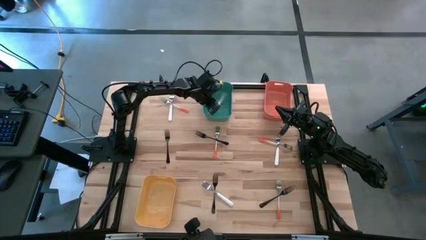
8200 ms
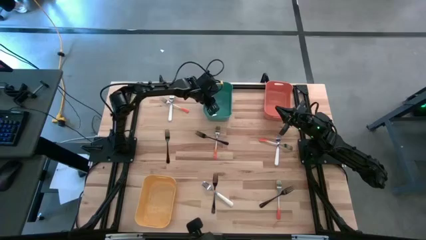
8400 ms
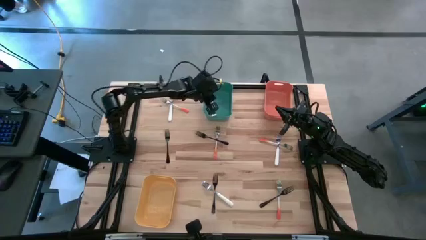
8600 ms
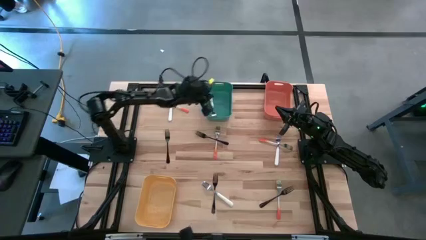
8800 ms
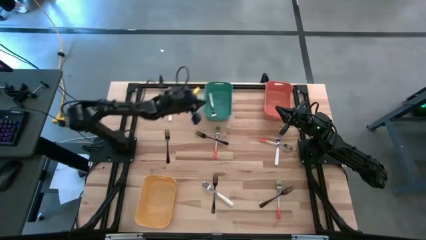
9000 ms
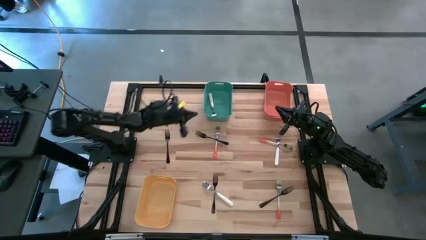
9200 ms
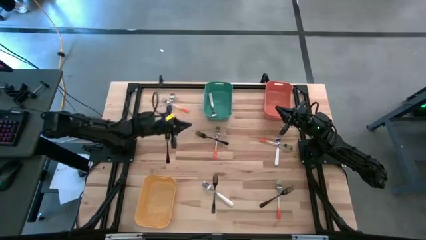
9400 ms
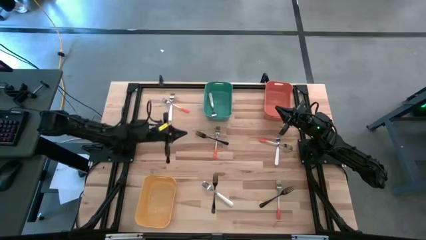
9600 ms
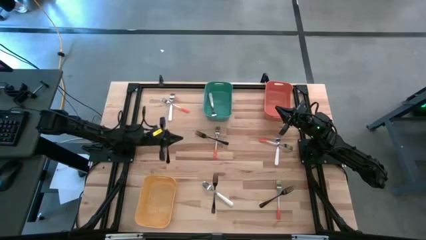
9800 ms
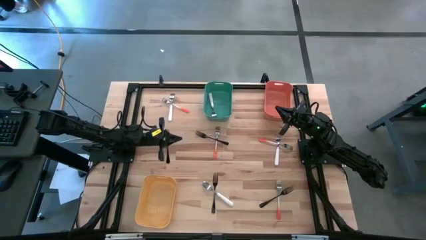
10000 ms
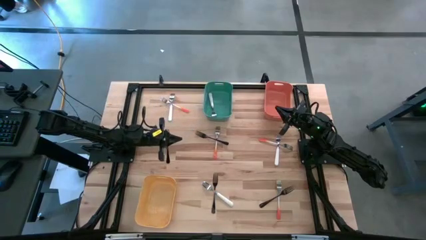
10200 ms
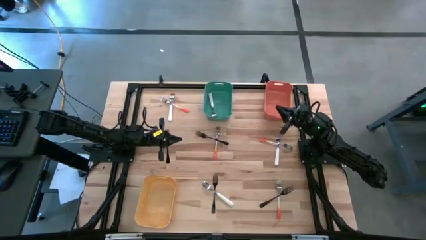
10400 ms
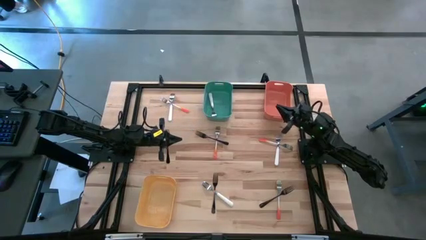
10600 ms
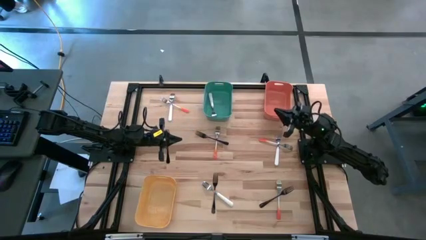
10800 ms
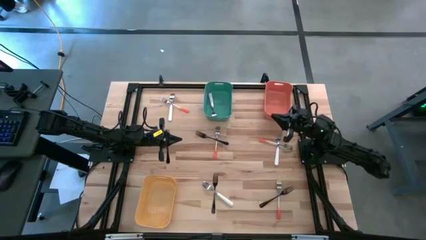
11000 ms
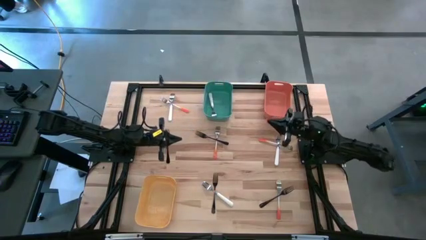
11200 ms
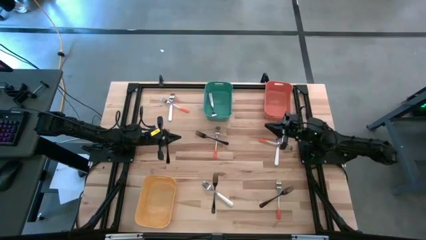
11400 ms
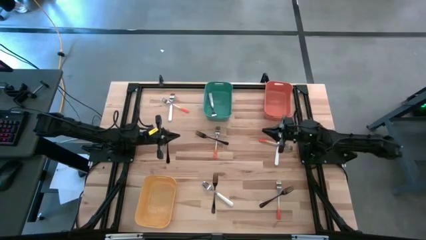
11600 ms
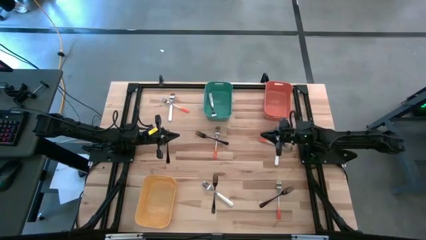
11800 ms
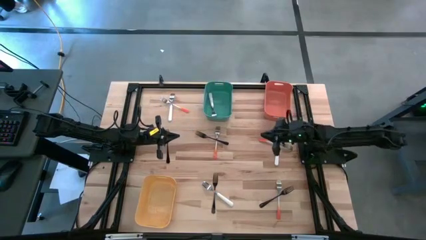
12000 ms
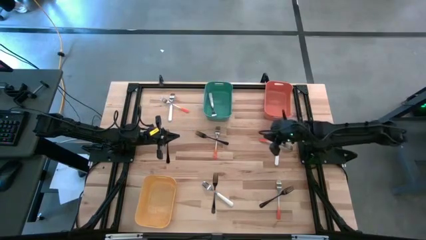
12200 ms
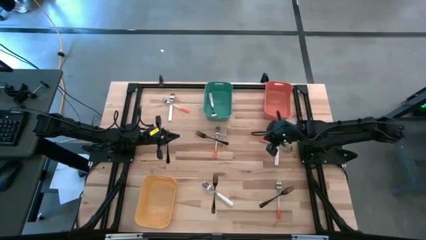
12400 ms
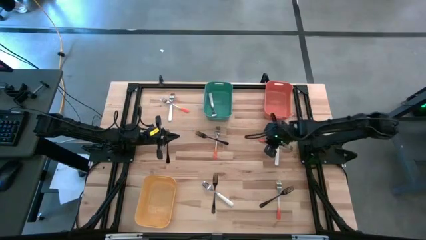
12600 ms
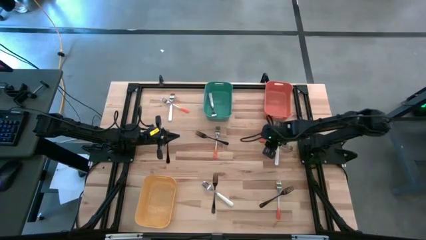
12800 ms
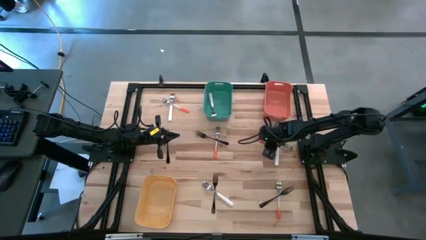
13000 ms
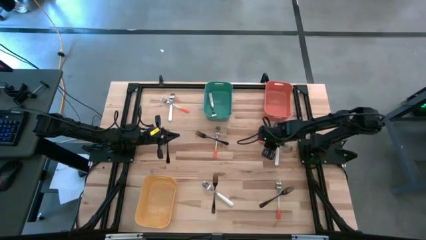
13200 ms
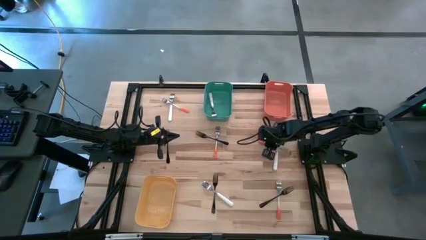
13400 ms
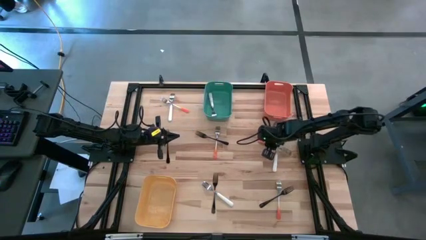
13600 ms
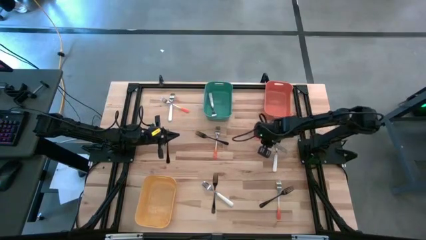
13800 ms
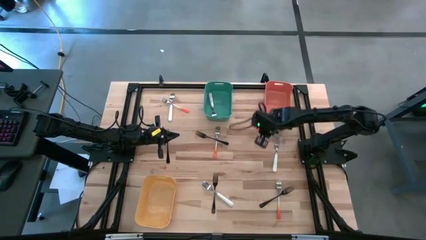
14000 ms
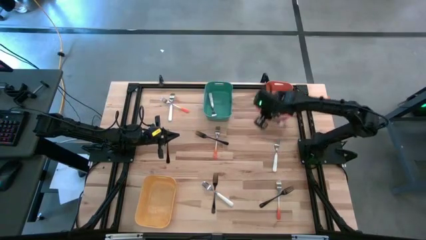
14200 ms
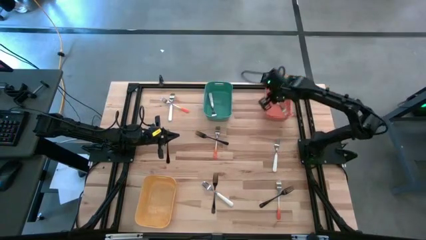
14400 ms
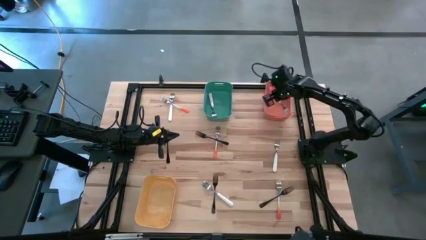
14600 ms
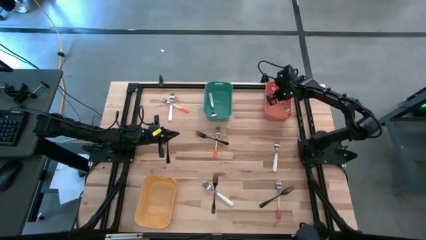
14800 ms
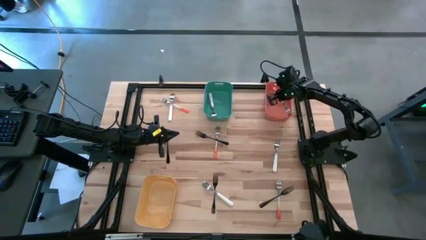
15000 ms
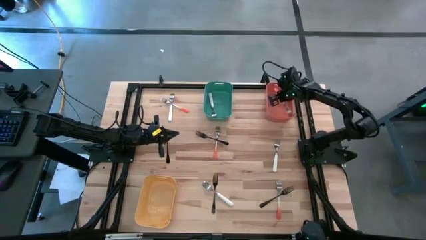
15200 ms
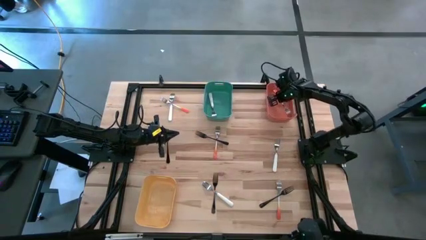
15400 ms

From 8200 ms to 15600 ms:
Task: Sort silverware by color (type)
Put the orange fork into the orange bin

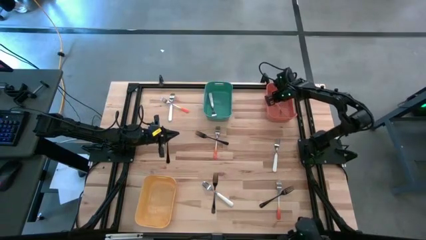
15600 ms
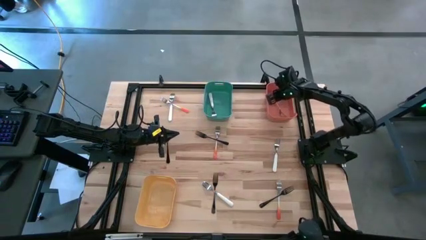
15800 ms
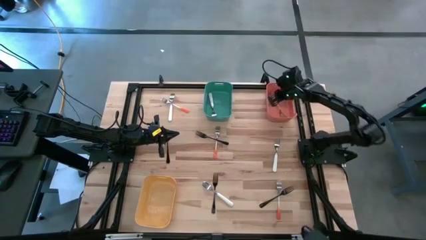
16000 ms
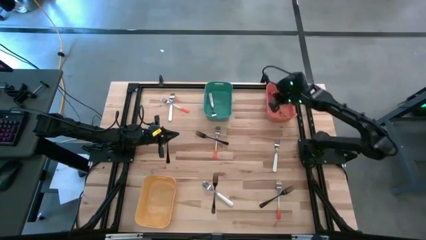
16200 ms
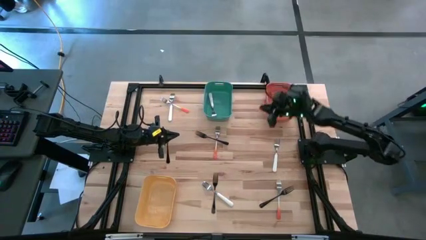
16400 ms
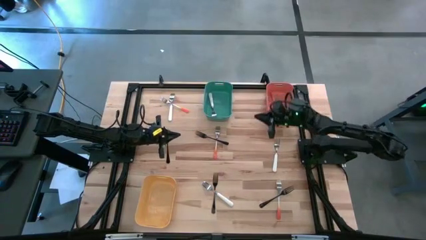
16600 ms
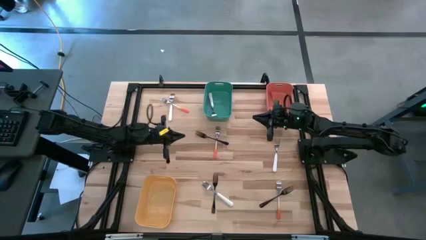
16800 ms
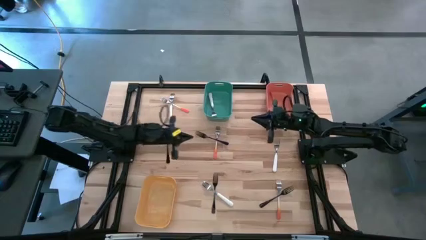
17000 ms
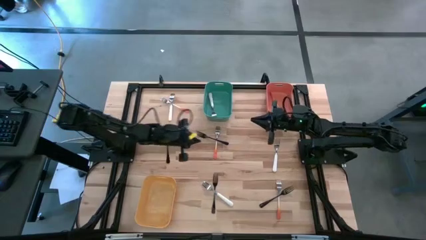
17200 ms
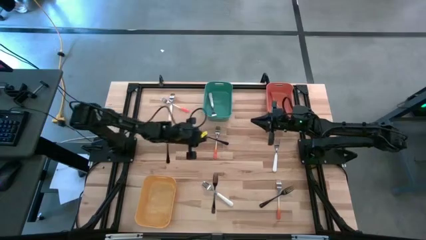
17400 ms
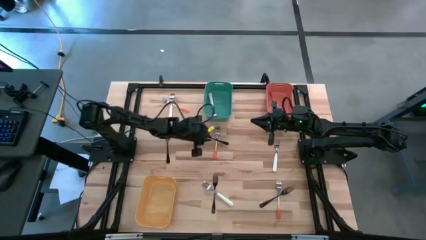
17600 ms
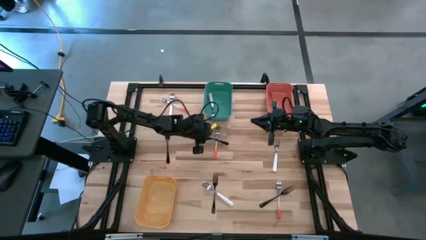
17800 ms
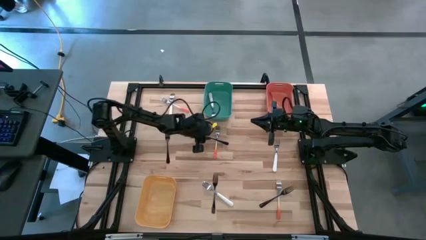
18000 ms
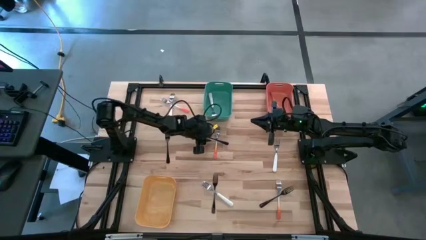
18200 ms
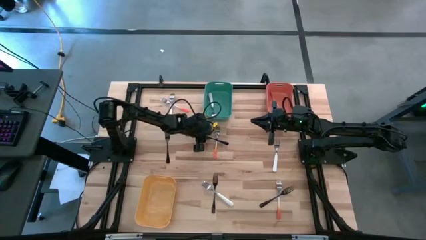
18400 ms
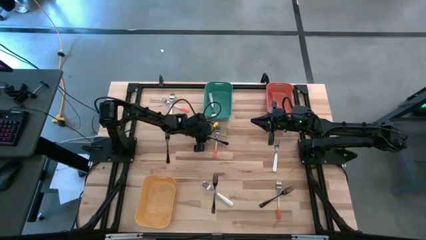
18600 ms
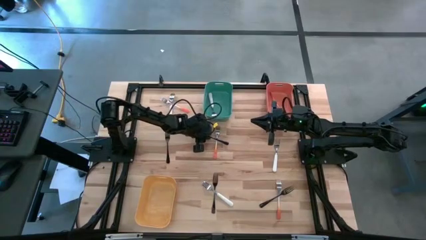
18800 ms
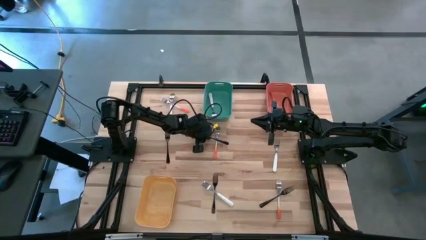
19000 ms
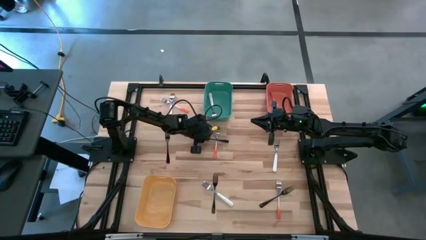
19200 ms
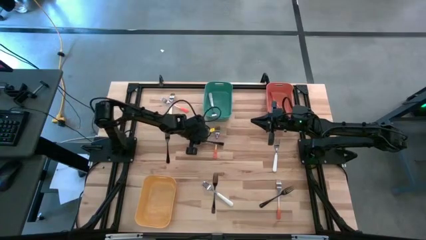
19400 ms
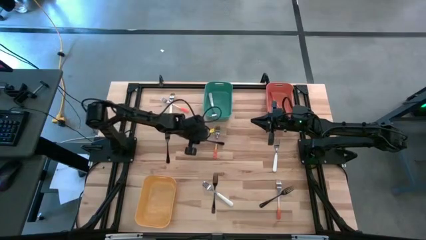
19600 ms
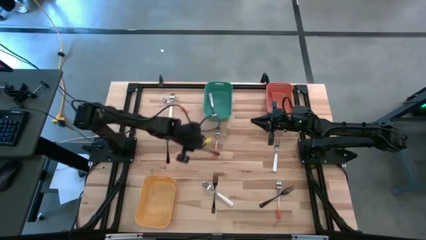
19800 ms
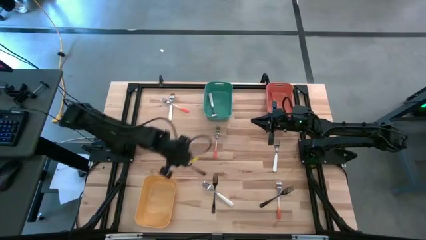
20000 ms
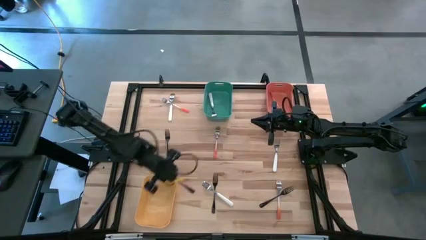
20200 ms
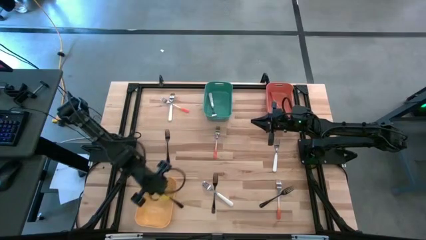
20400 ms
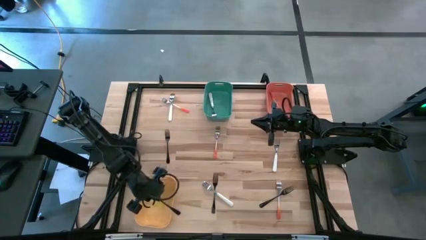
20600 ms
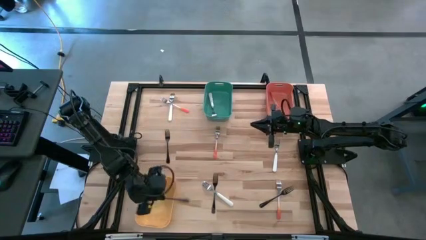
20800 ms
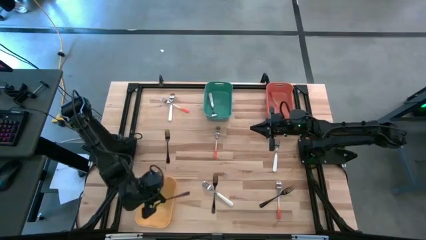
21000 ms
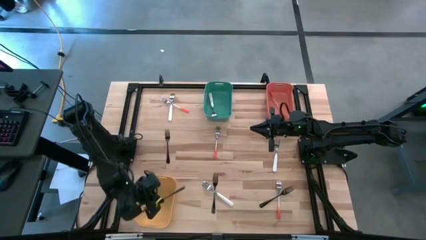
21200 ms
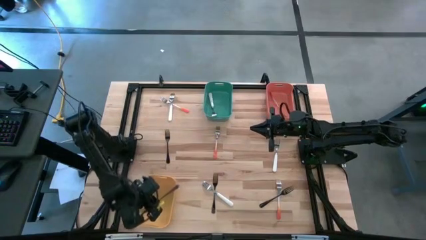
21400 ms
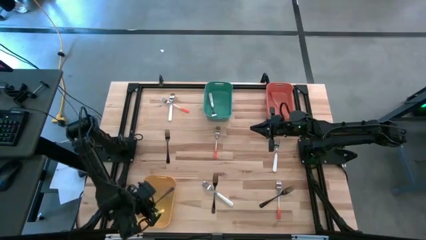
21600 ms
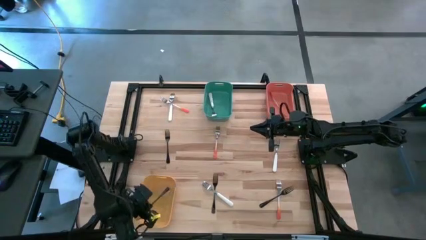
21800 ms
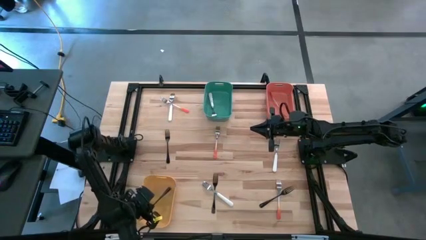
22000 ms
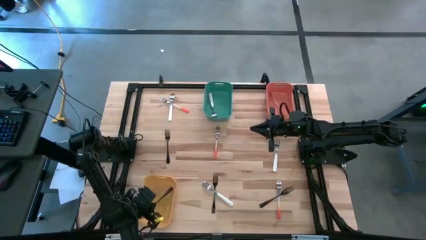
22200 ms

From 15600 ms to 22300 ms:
Put the black fork into the yellow bin

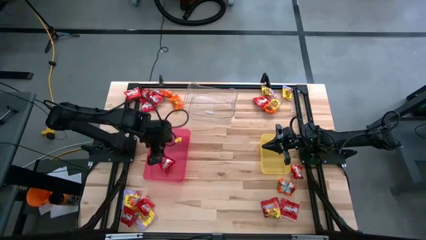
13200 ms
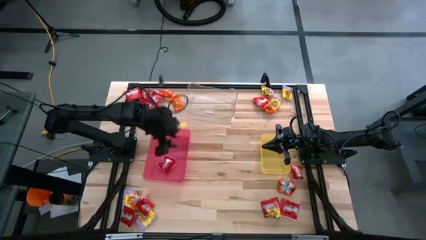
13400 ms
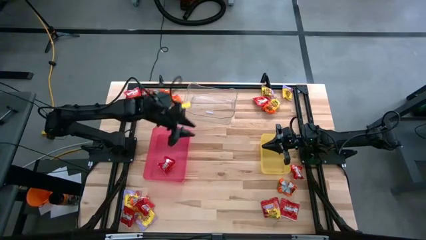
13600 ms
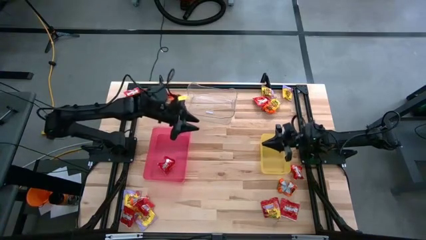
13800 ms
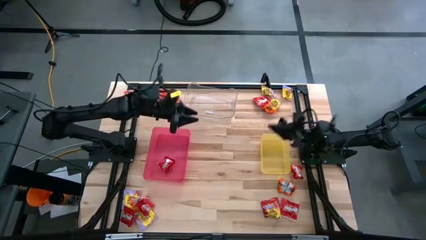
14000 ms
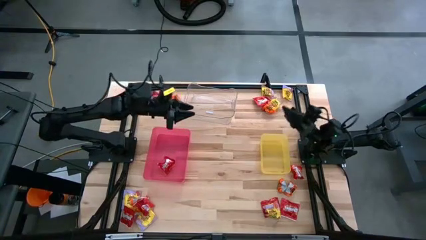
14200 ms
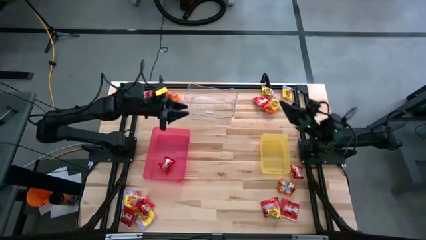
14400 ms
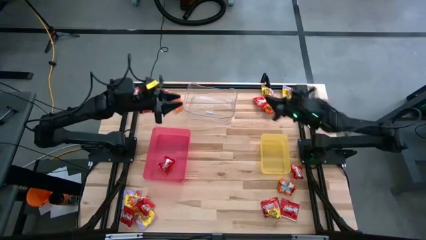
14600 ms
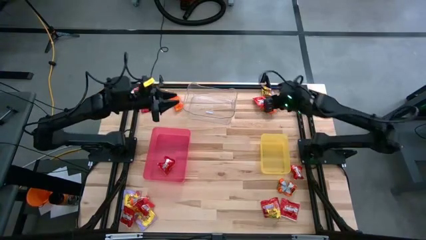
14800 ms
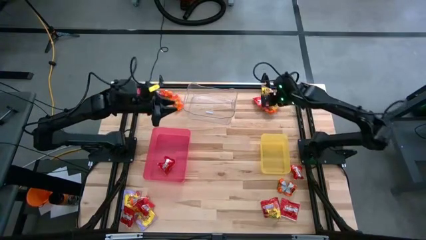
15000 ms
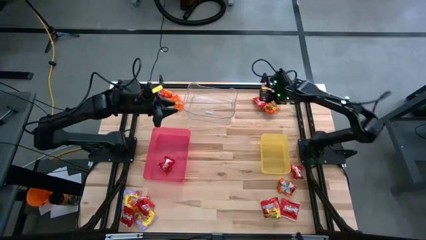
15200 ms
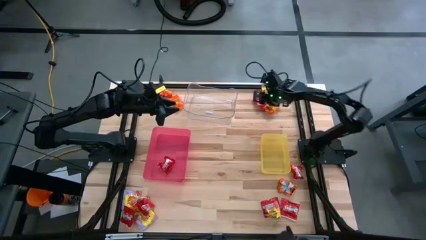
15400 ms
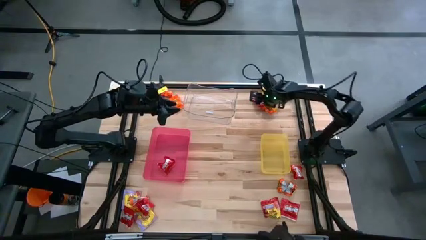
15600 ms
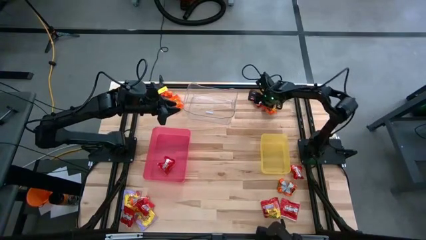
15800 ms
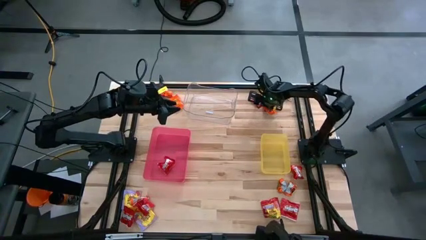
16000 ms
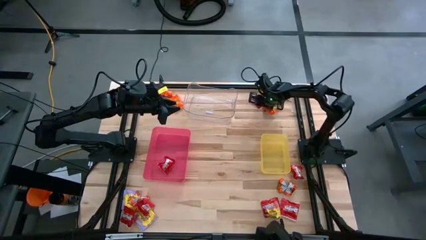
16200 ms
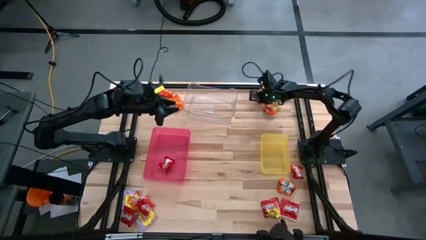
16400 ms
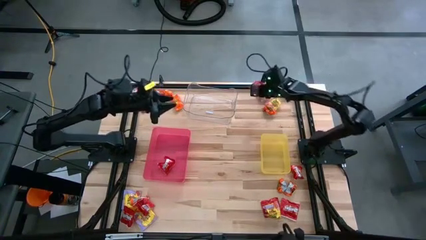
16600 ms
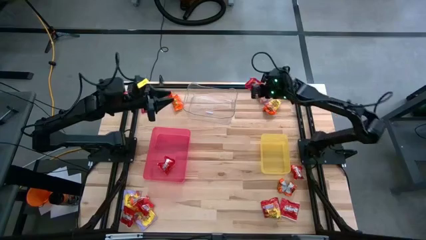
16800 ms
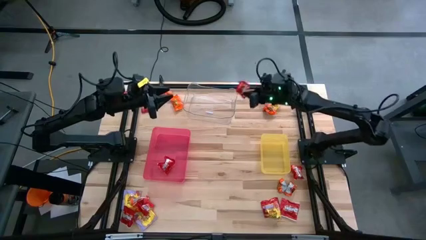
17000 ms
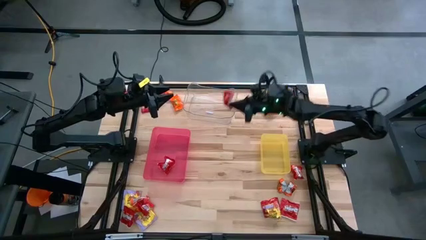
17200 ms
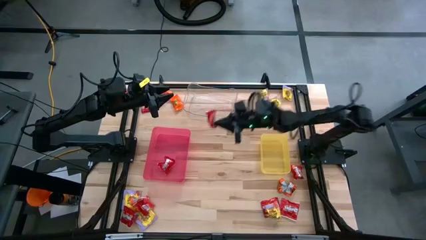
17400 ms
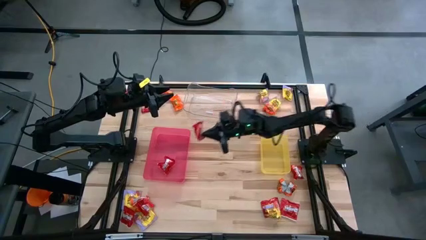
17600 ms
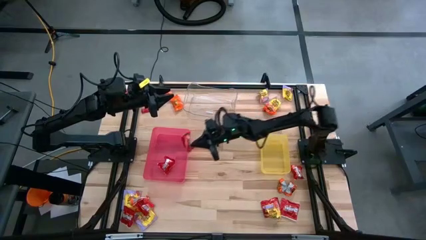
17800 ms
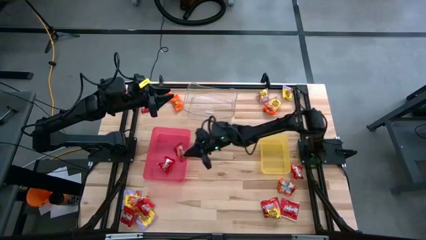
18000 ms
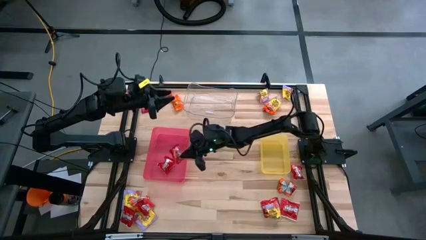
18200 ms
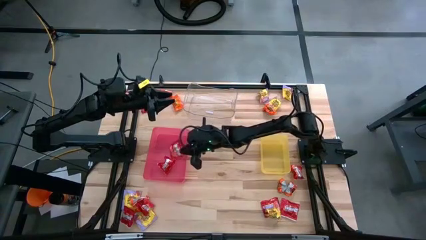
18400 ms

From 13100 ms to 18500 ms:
Task: Sort candy
Put the red candy into the red bin
